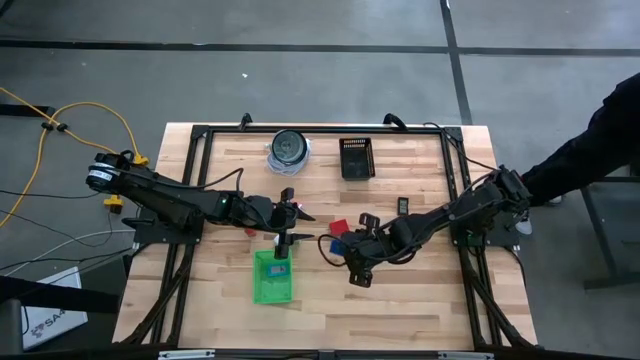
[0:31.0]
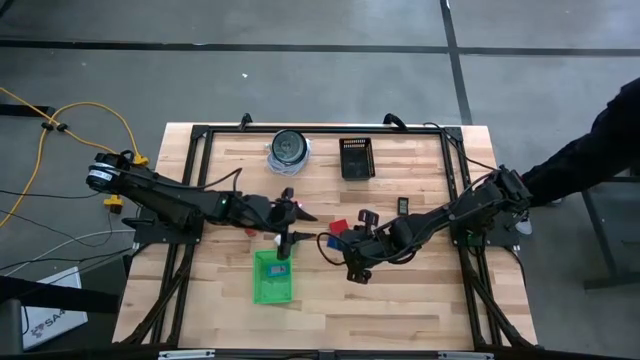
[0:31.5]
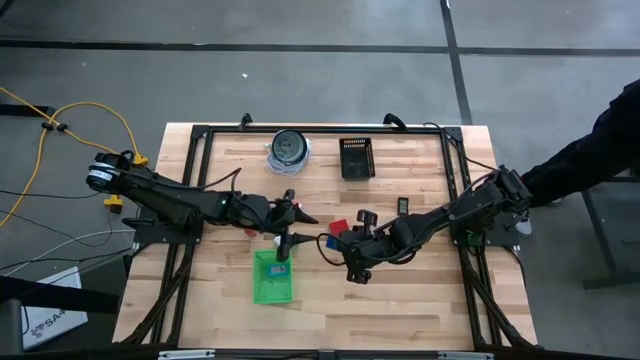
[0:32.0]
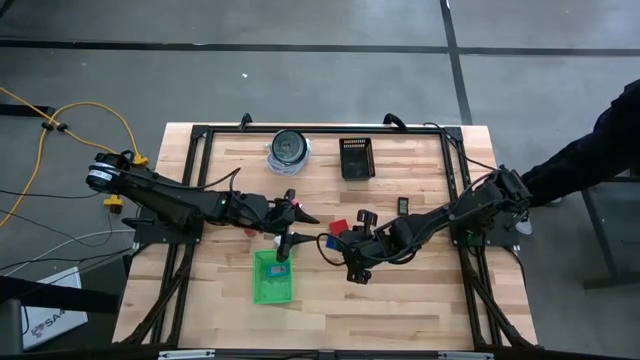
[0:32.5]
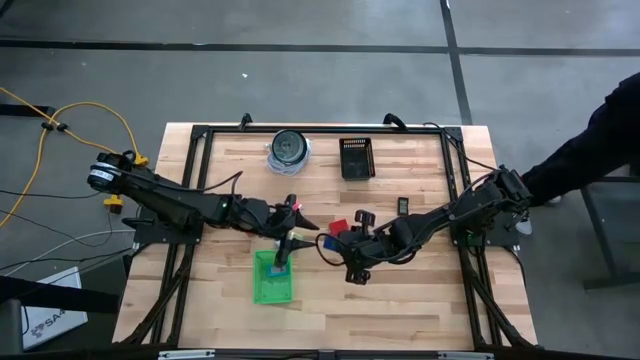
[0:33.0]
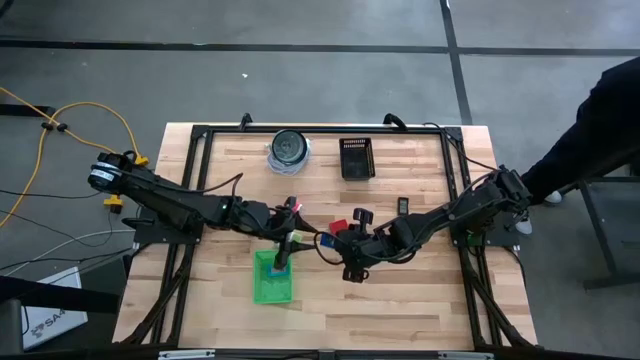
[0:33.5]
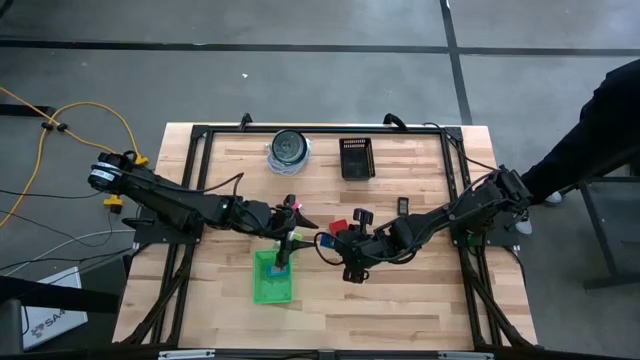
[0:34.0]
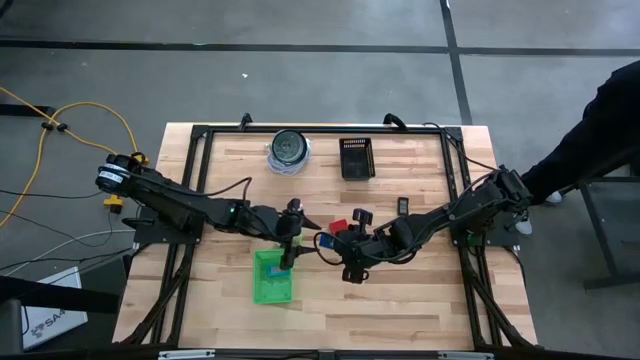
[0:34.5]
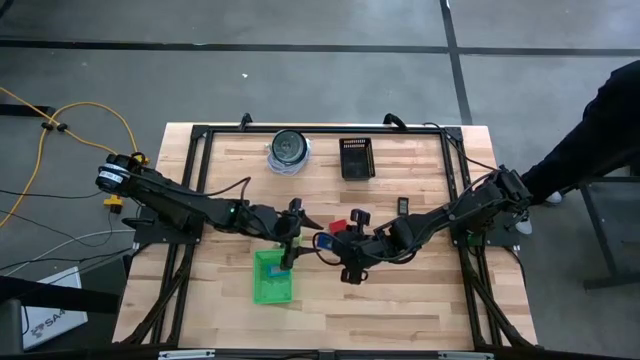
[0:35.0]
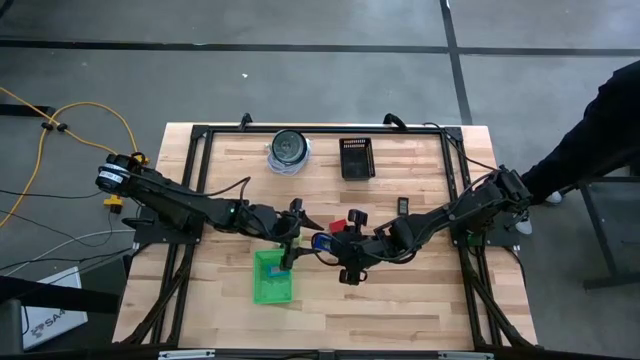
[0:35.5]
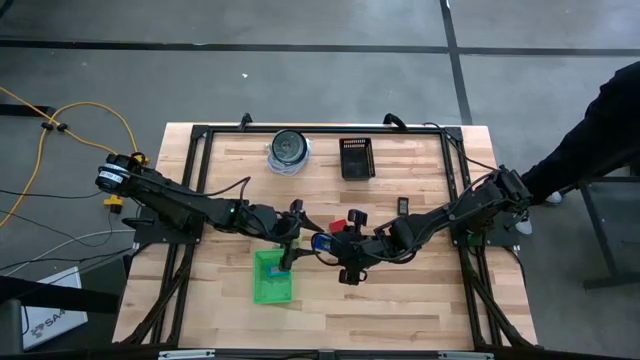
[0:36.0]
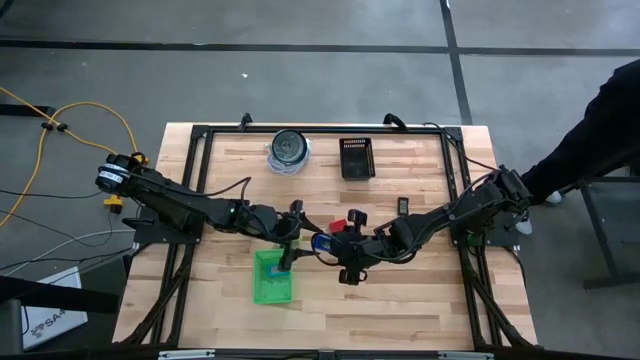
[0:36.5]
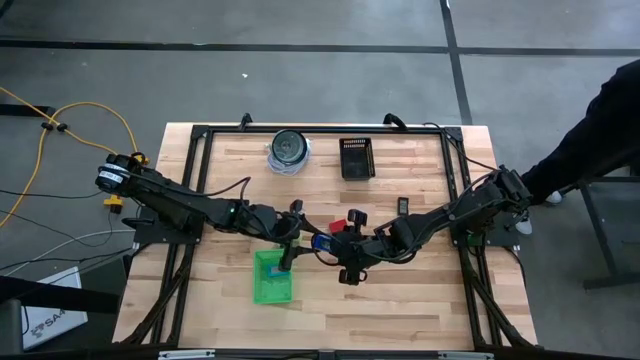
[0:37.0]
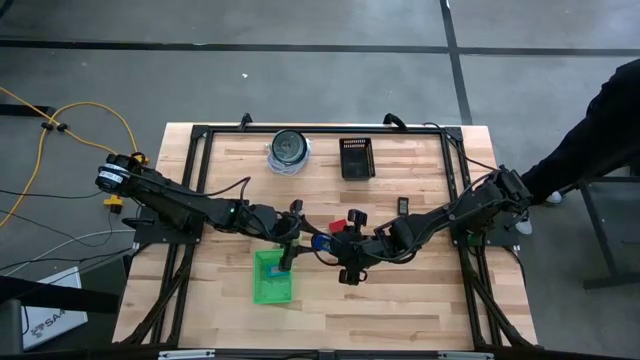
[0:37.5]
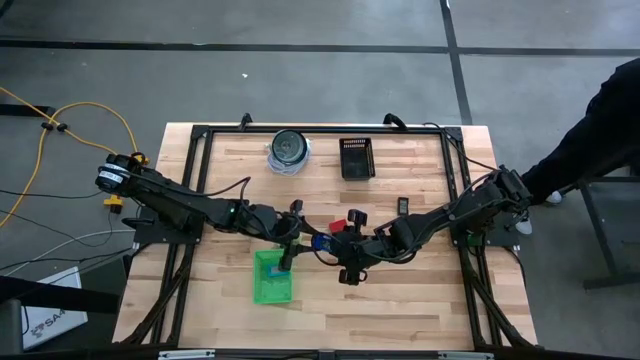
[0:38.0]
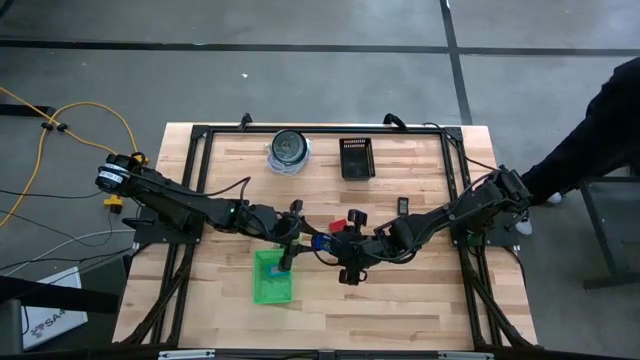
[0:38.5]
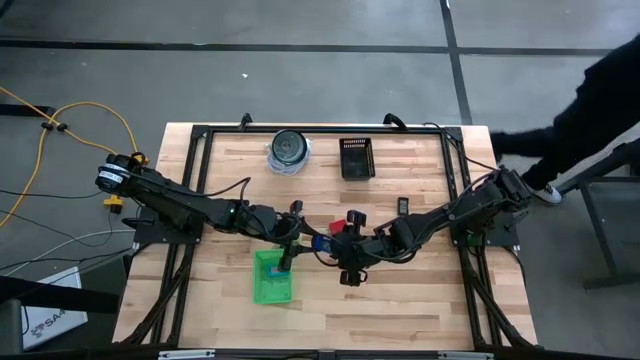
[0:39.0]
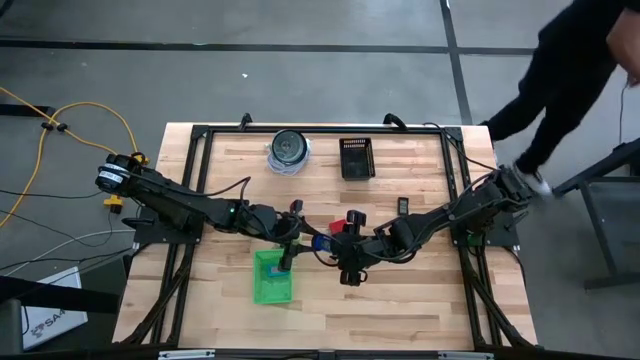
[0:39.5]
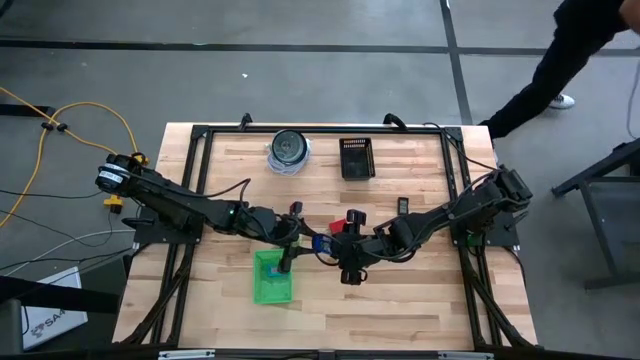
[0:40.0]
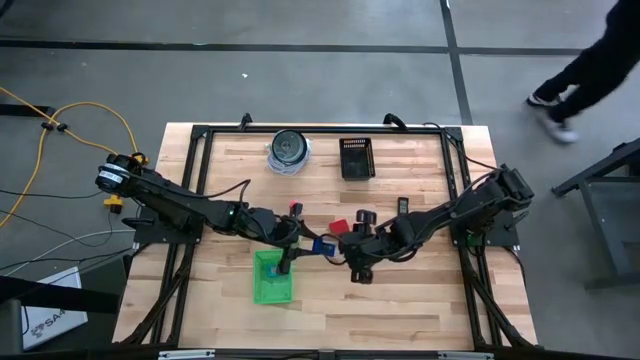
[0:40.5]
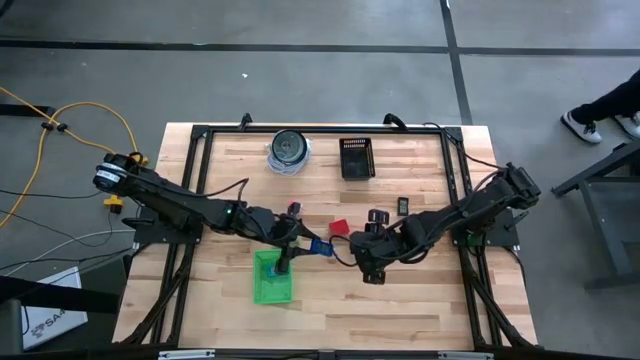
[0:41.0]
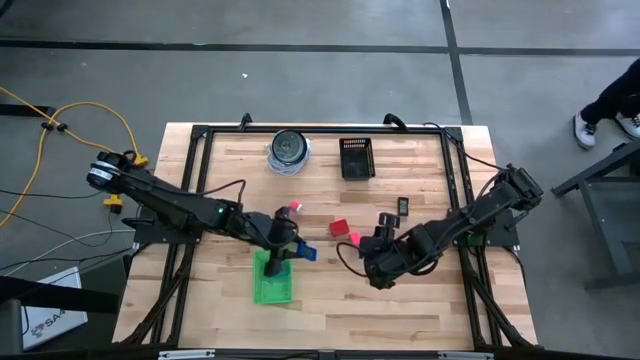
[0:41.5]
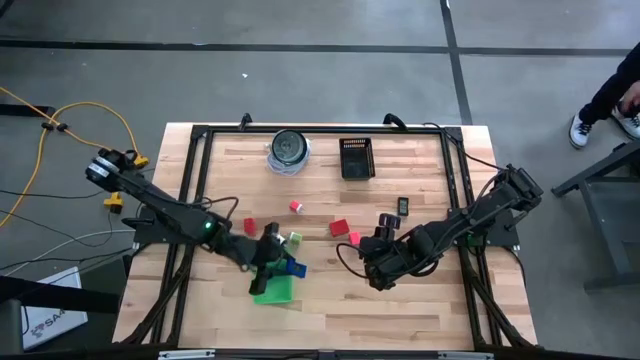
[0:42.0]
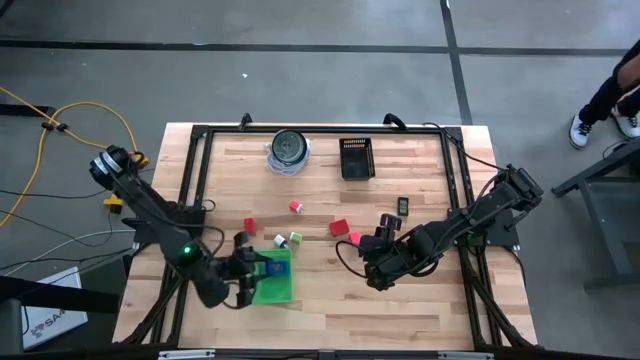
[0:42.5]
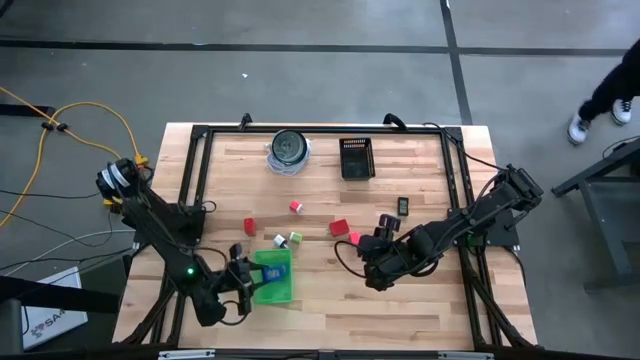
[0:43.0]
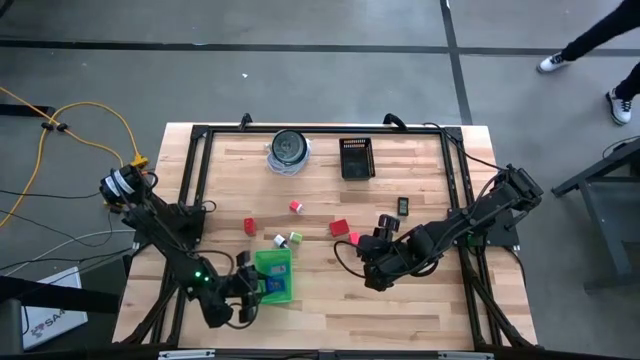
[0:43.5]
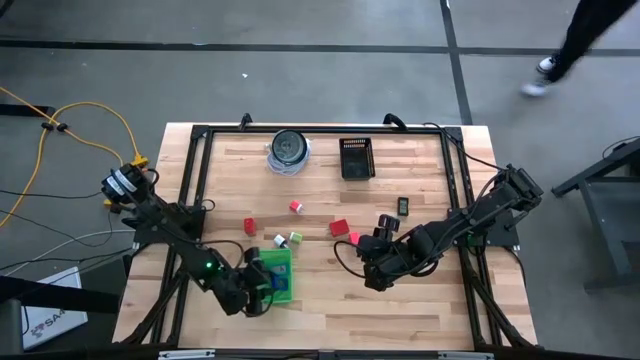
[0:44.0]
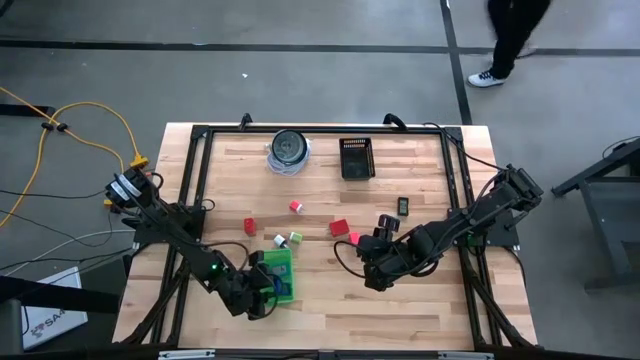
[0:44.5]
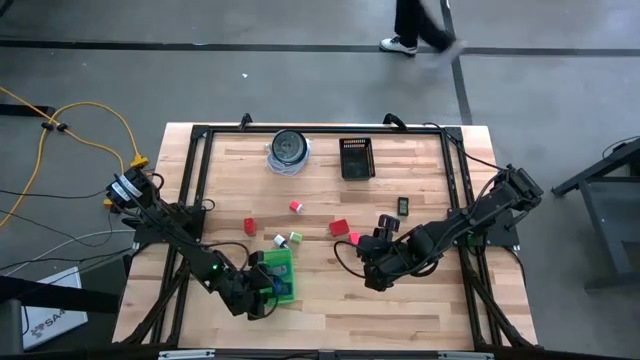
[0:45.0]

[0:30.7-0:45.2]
Task: Pick & Place Office items
Put the dark blue digital clock into the green bin
